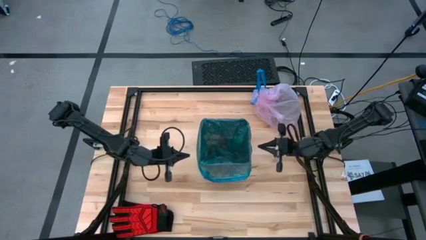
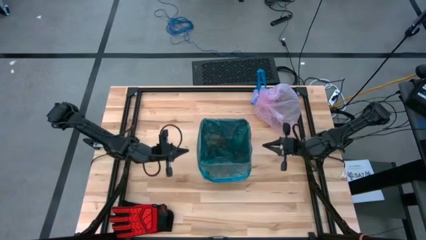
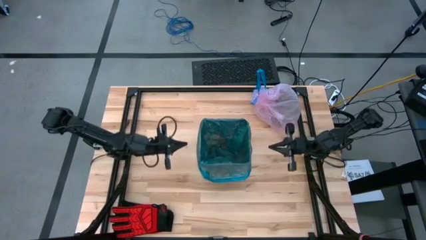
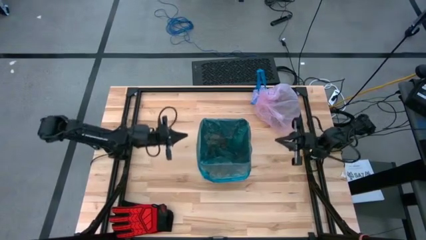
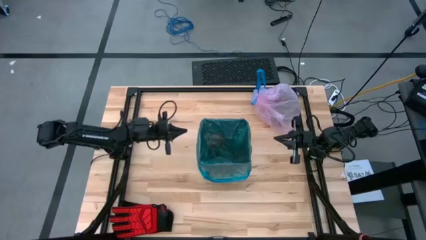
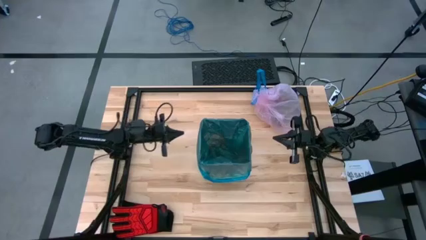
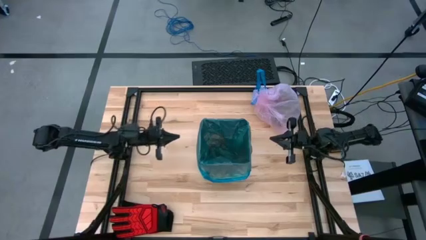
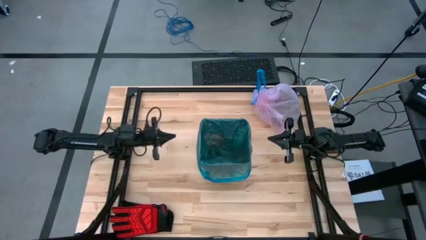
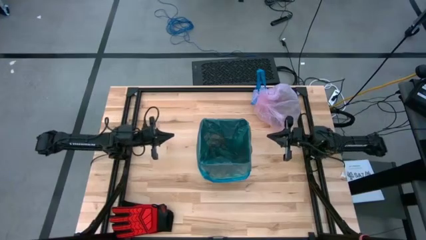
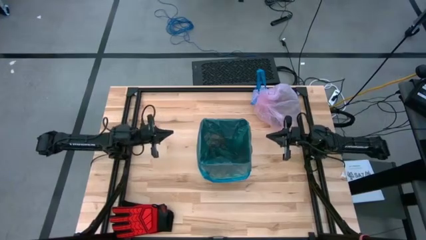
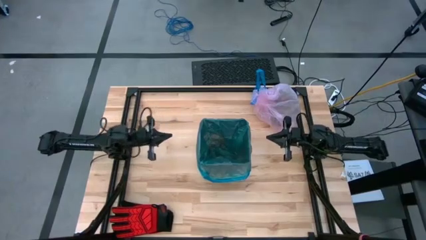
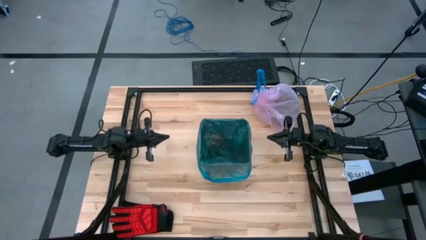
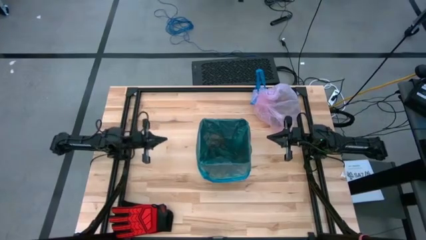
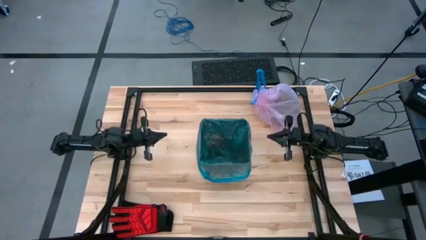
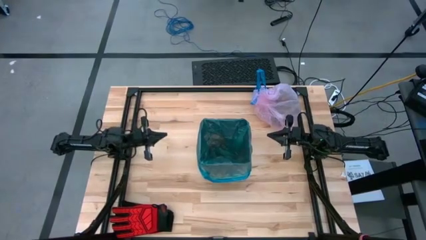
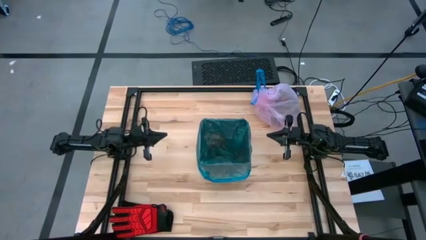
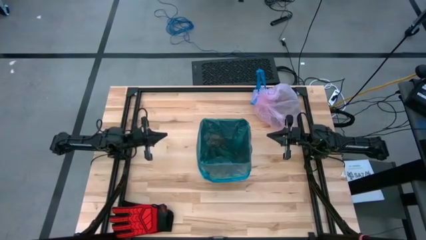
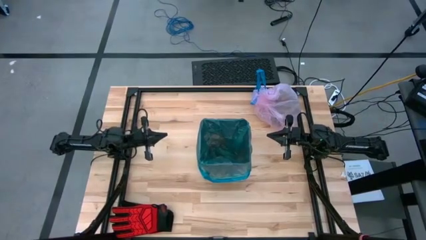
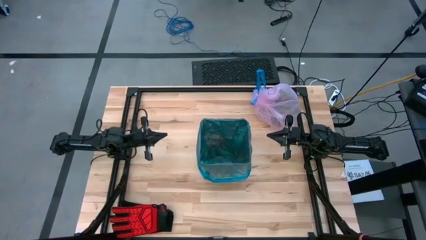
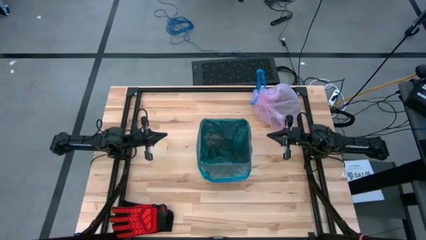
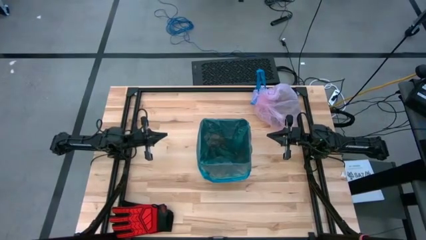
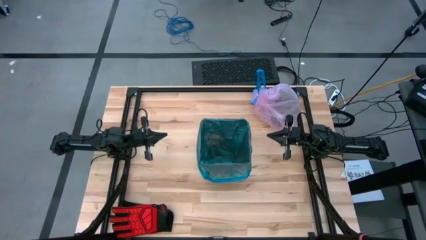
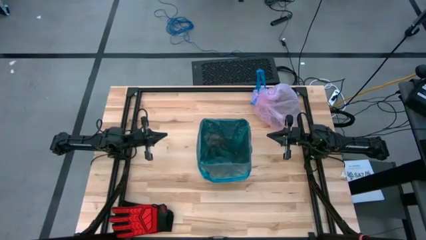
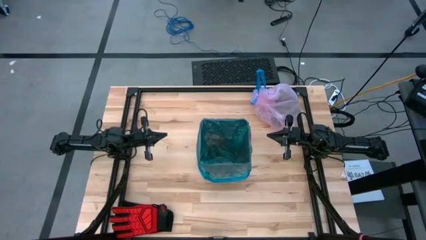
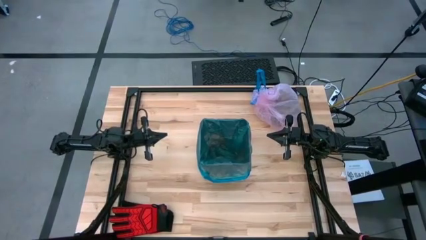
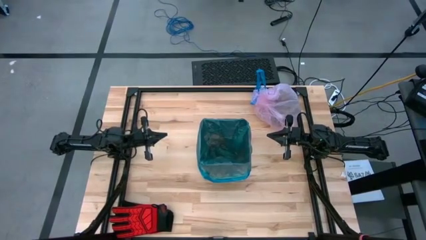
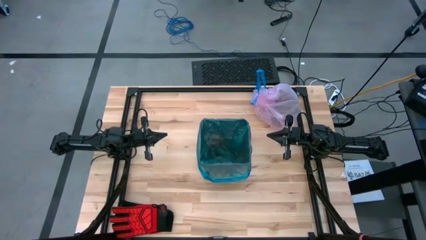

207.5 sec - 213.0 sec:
Task: place trash/remove bag and relplace
Return to Home Position

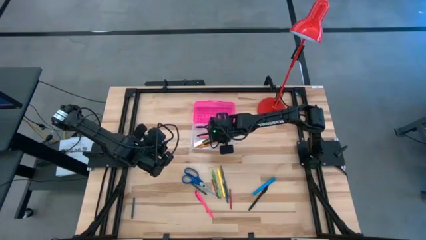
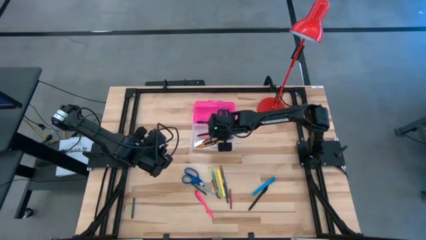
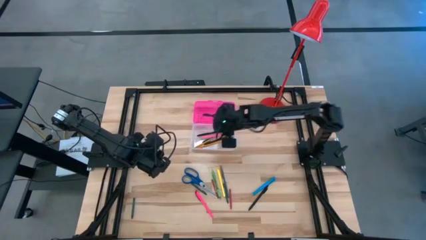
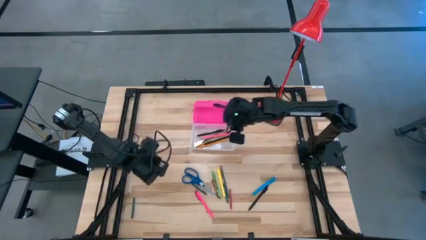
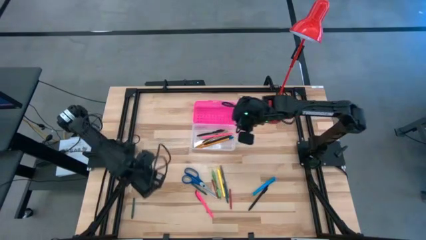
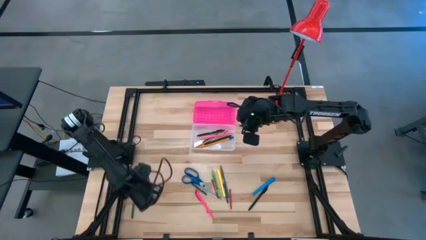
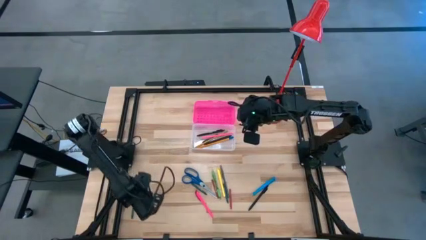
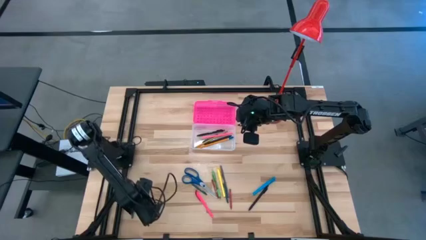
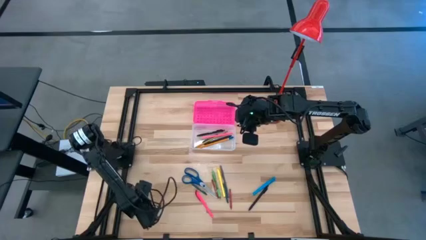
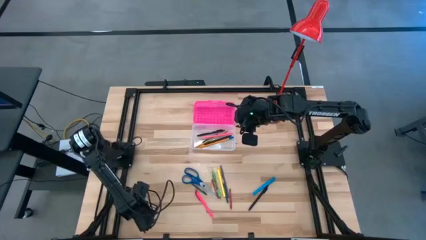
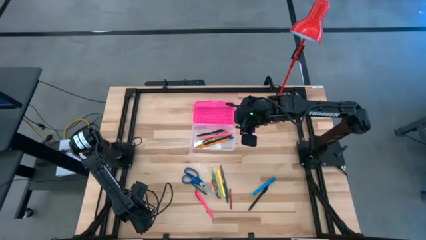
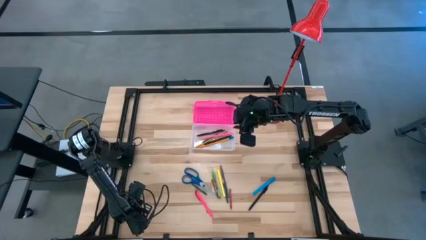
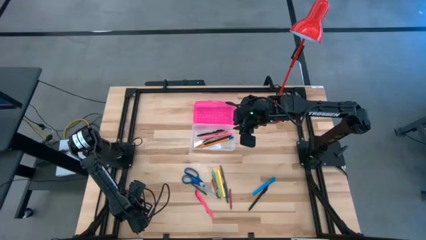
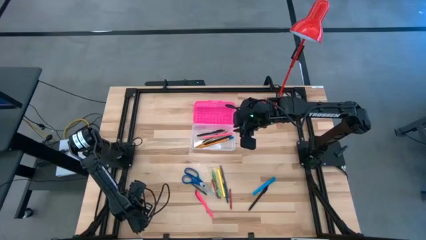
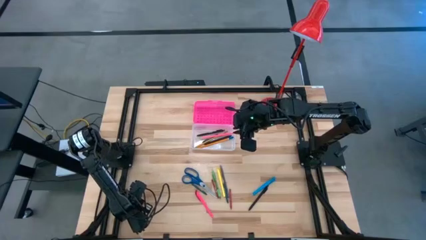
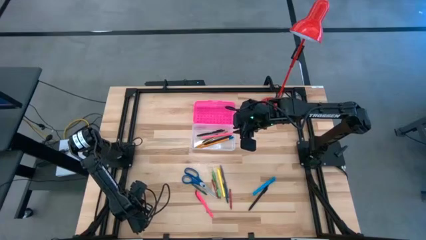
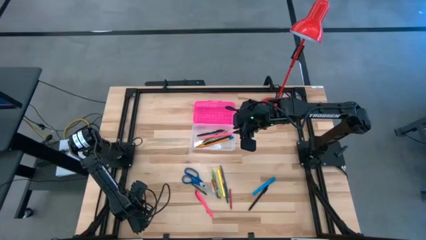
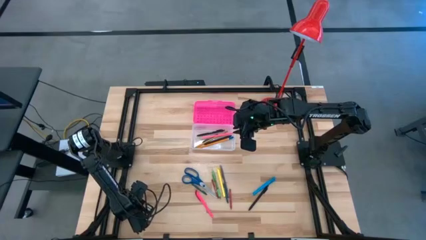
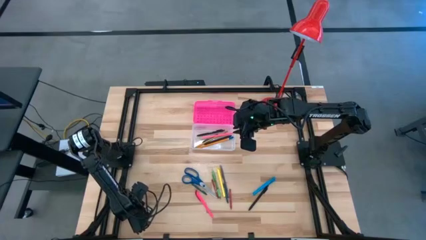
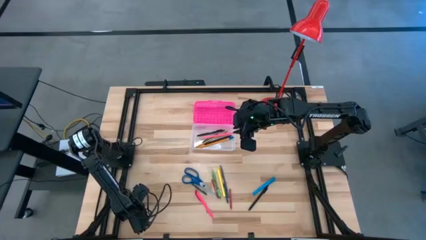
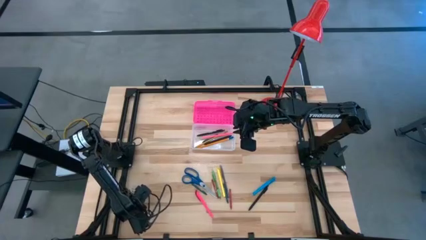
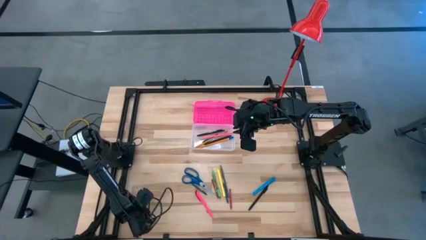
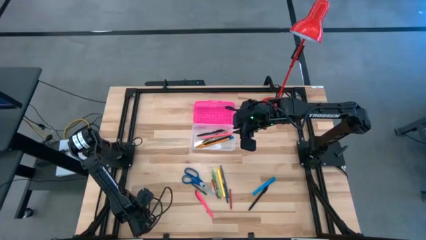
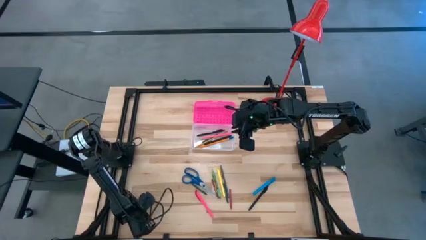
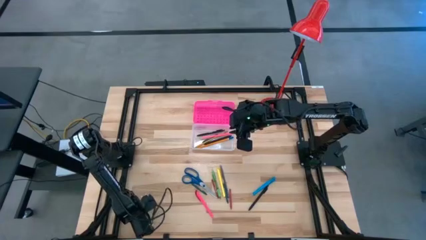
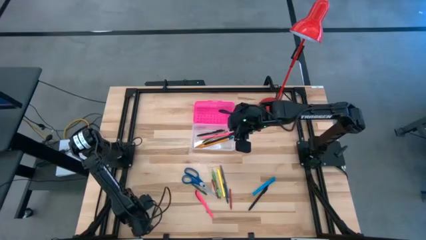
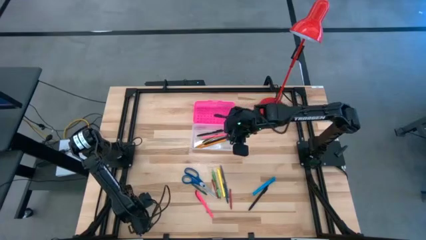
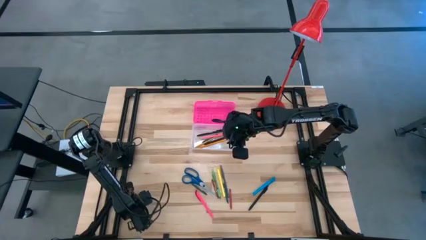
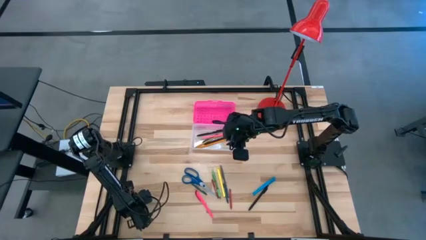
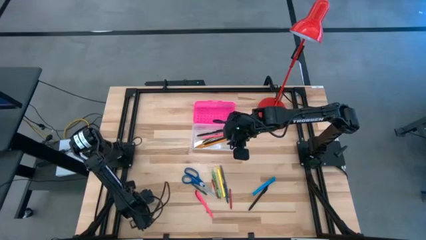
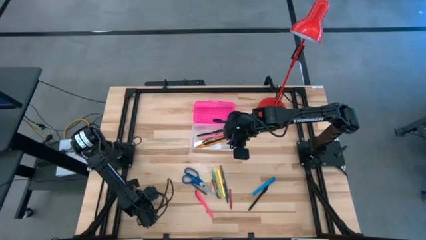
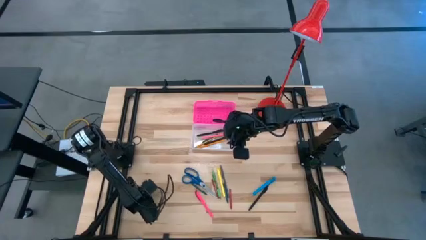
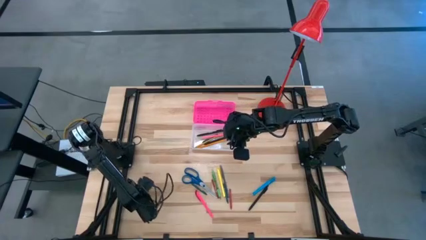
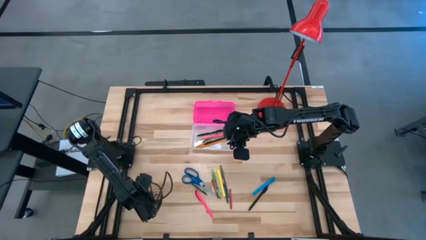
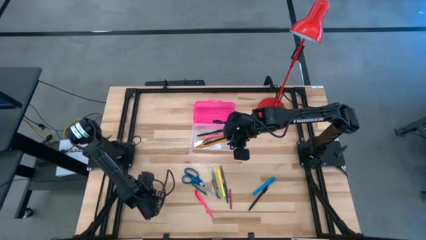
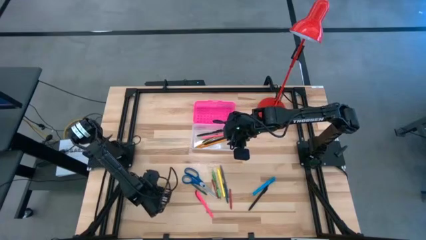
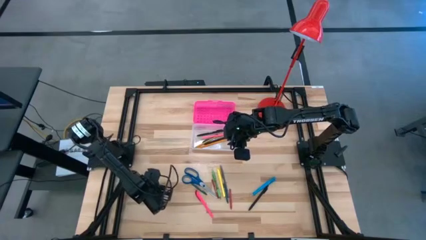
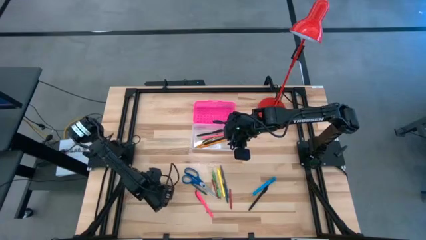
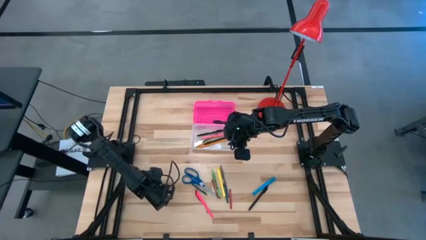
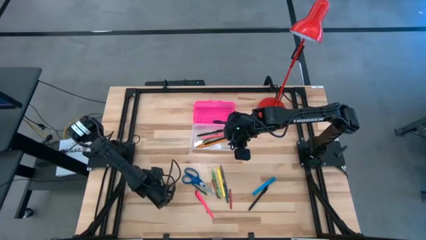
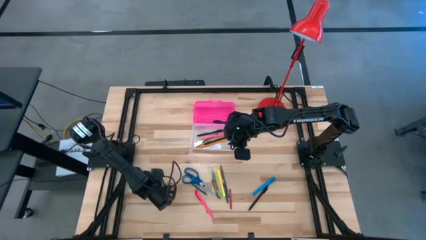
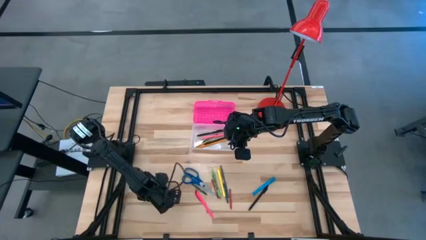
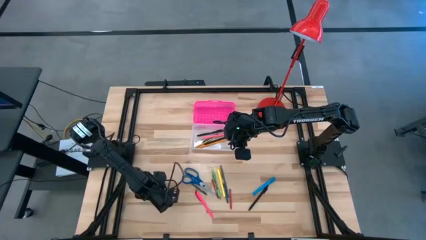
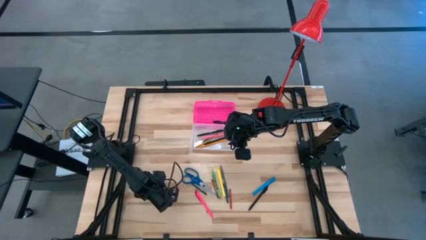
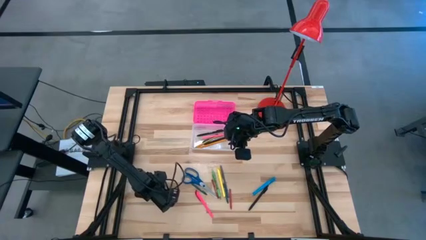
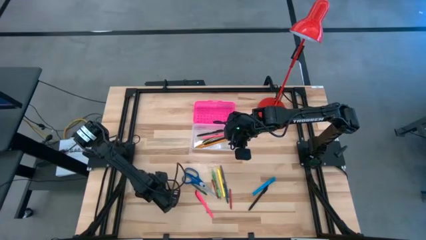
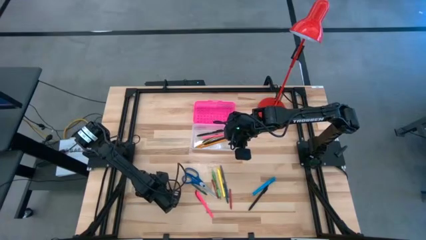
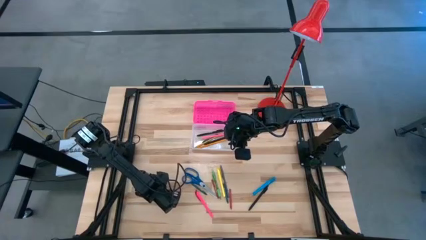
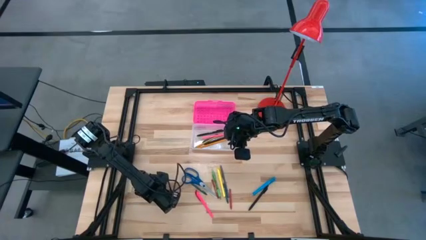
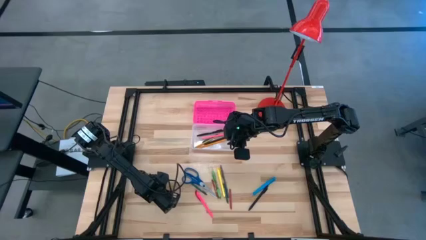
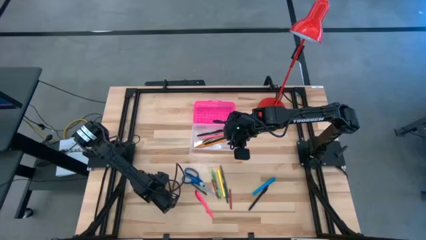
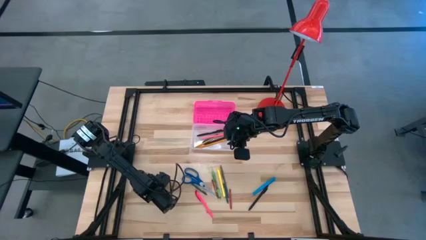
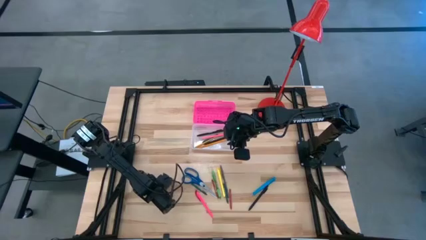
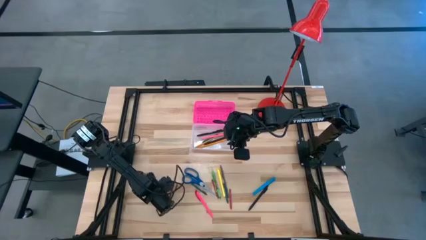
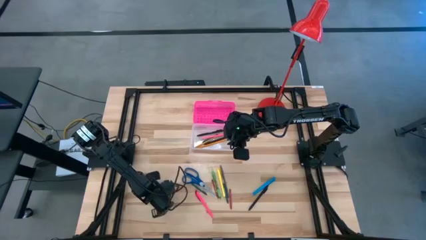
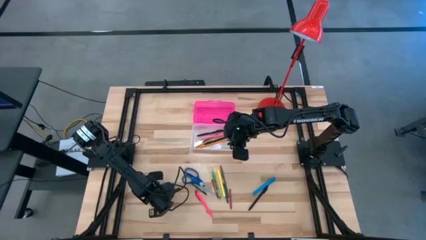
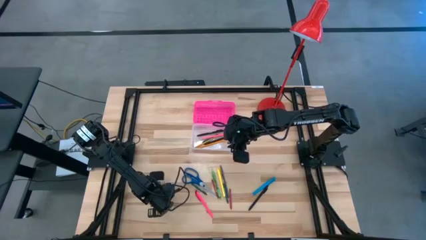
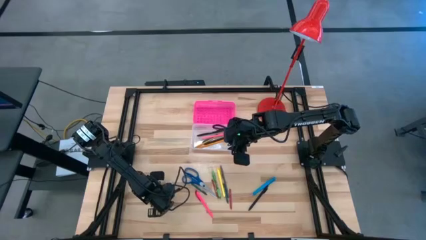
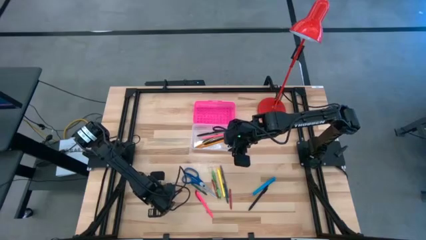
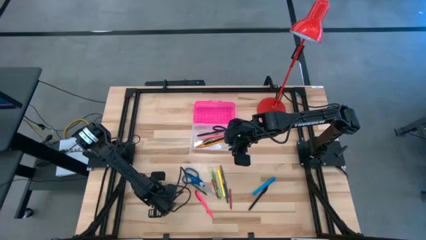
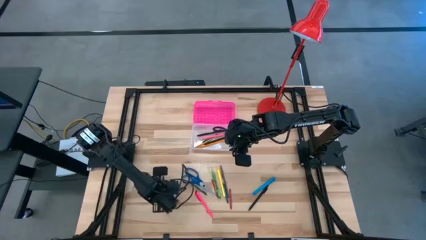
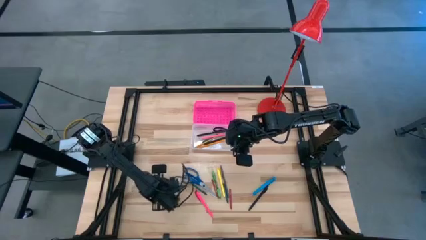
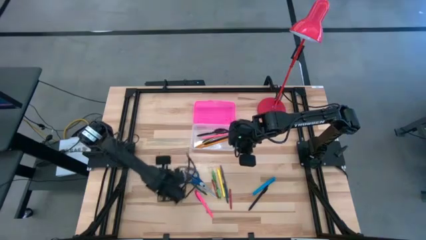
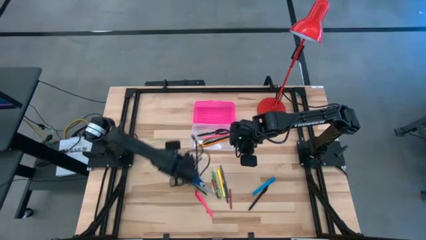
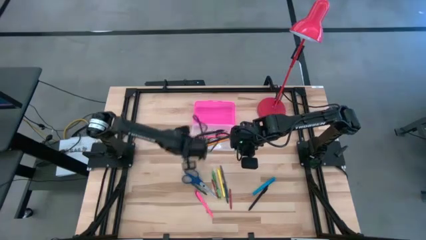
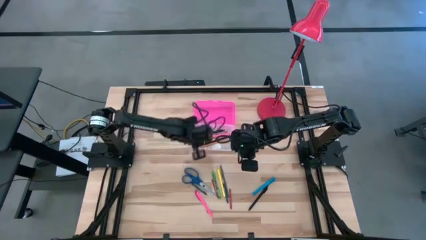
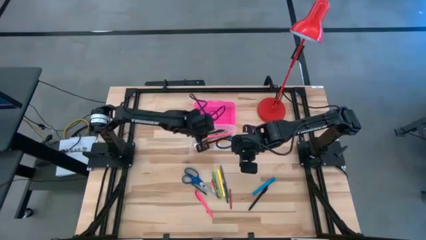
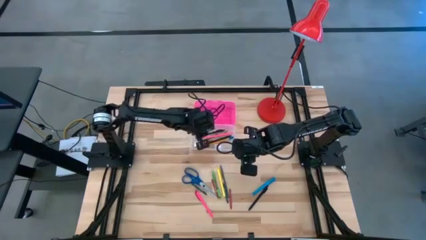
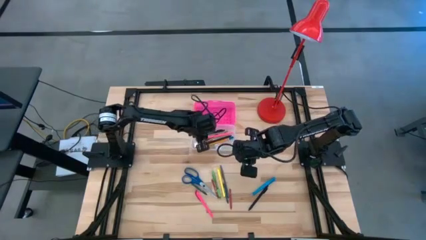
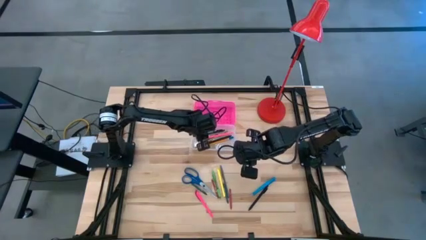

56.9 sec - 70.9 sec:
Task: Pick & place school supplies into a supply box
Put the green crayon into the pink supply box
